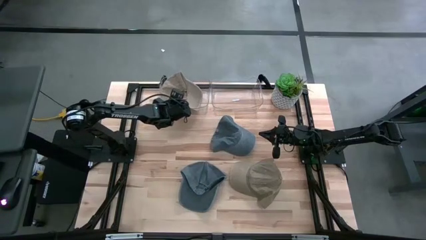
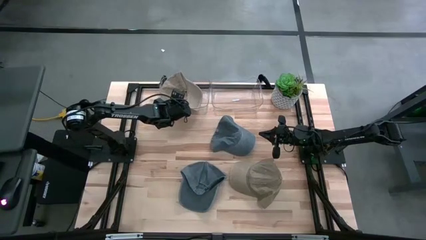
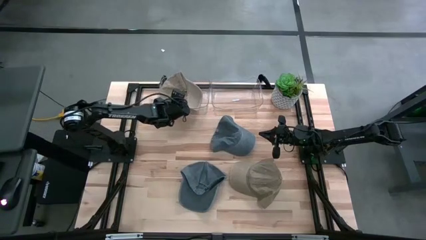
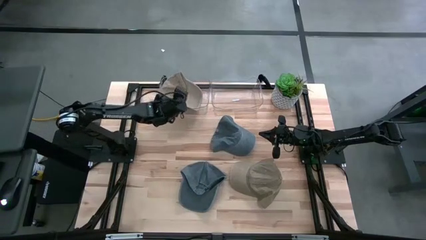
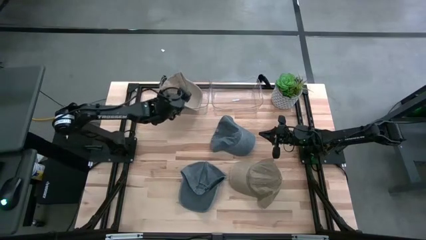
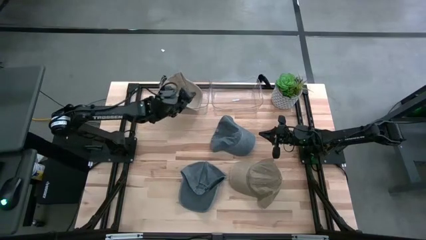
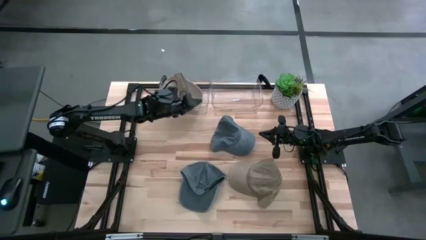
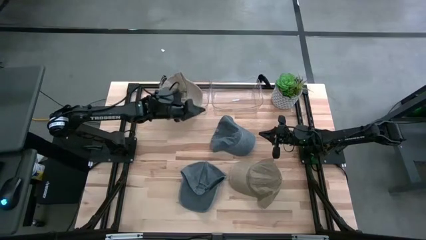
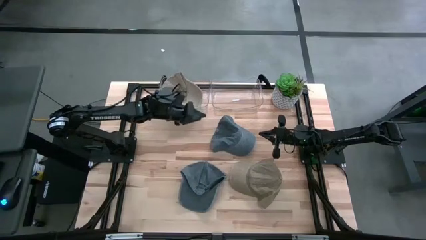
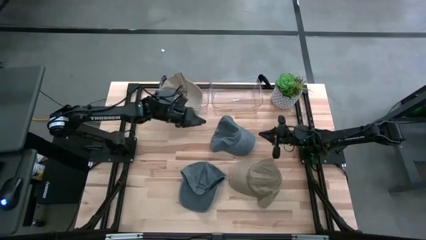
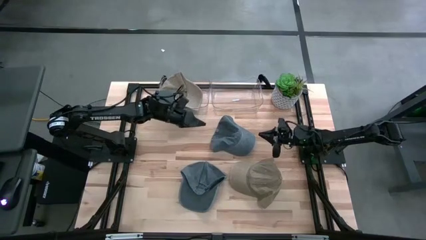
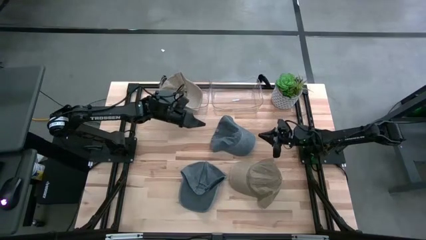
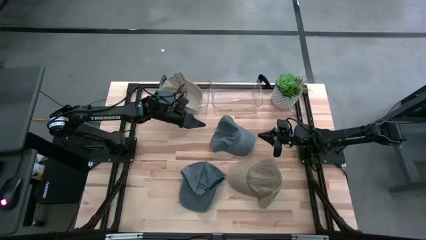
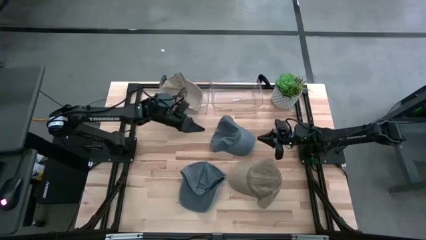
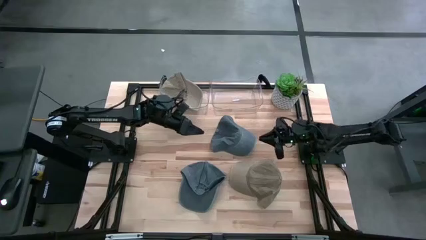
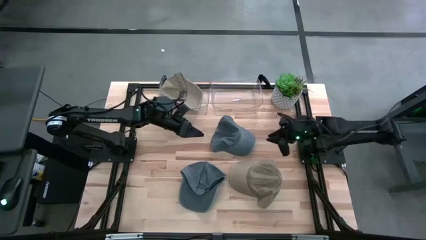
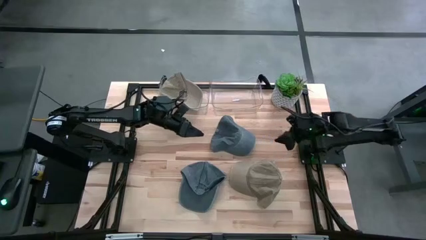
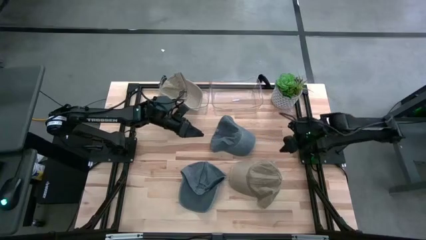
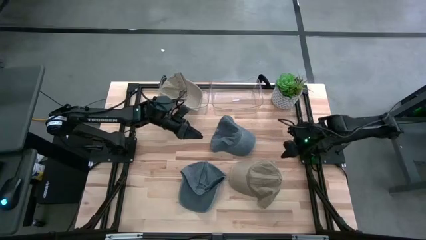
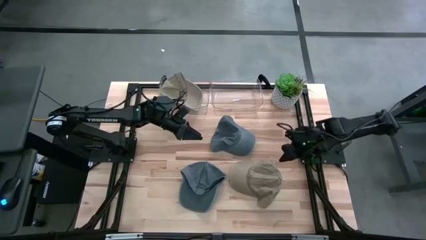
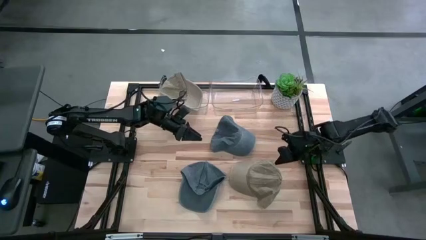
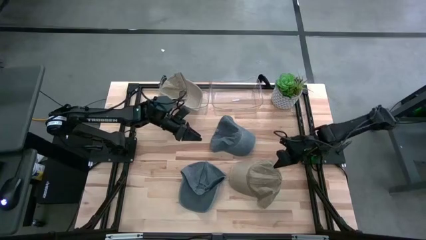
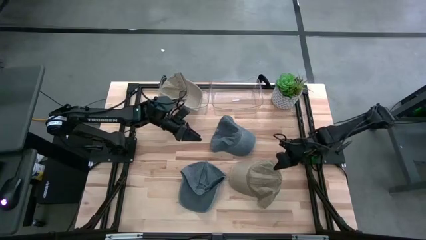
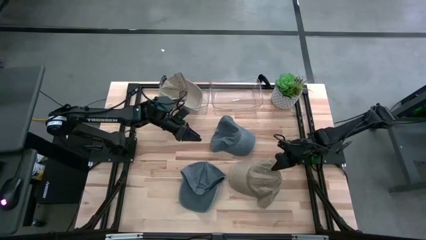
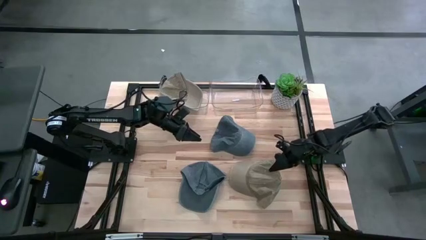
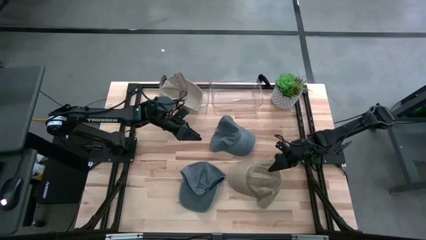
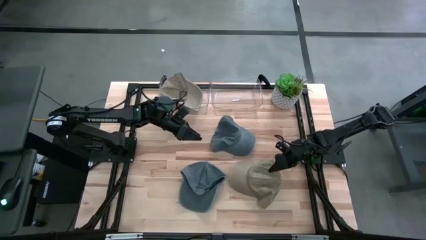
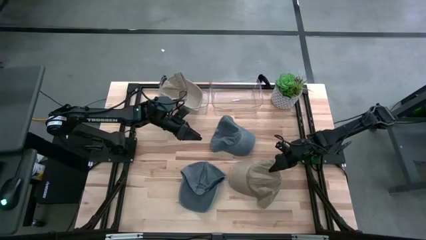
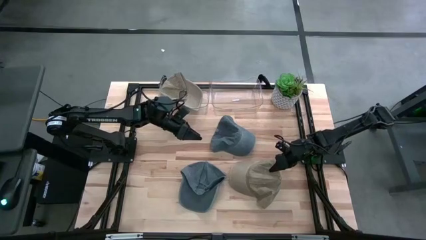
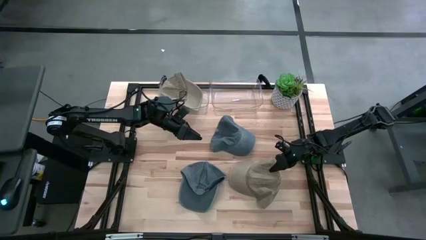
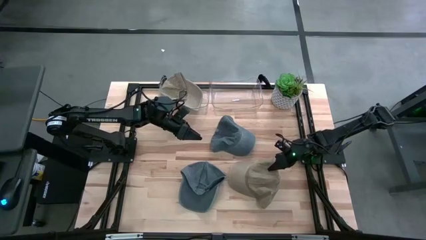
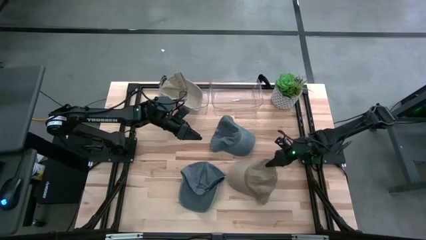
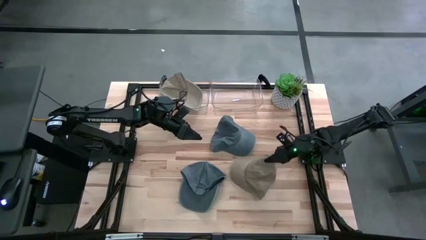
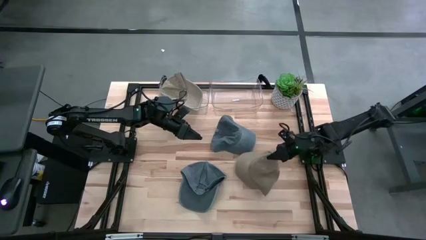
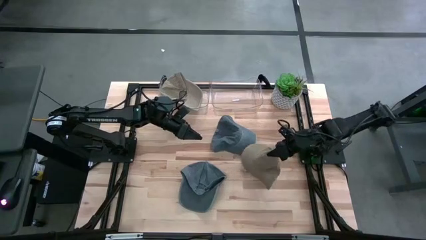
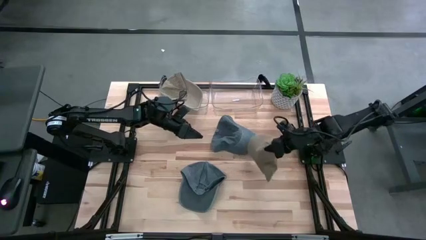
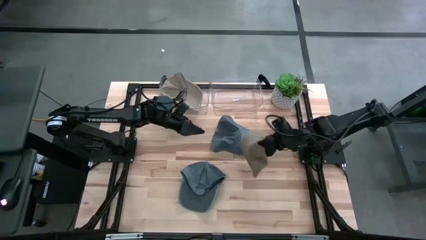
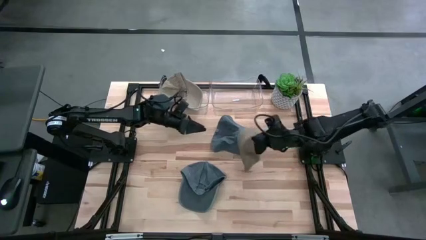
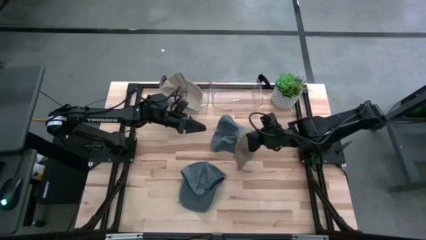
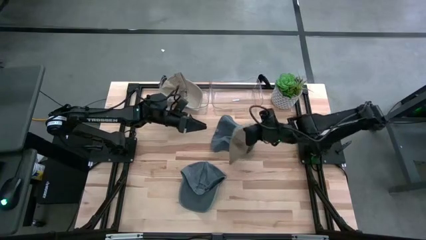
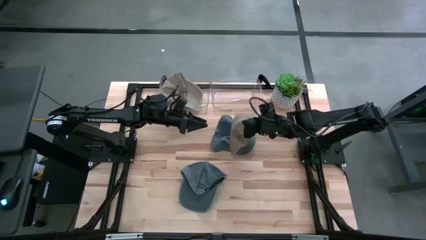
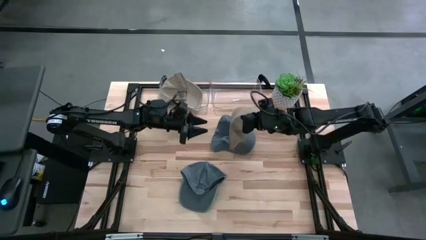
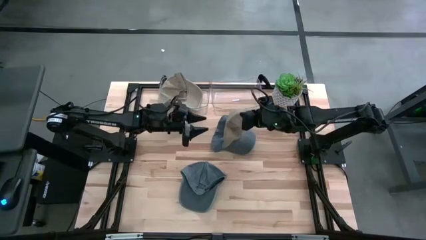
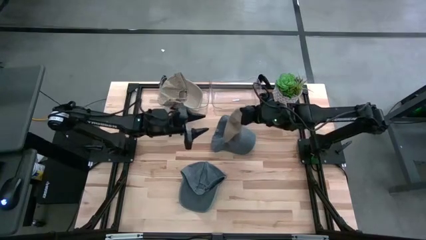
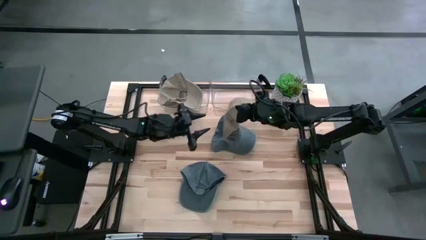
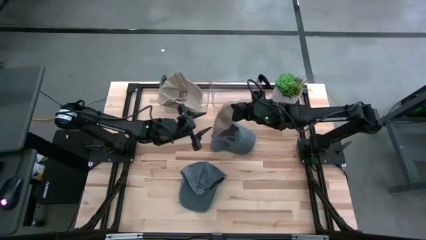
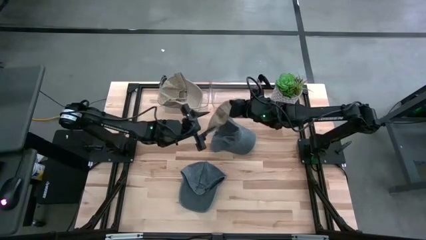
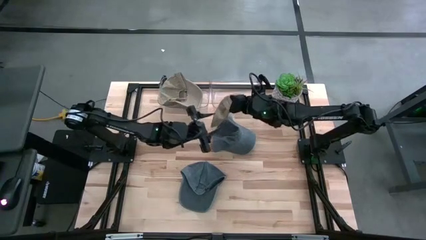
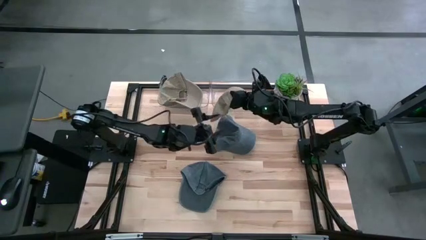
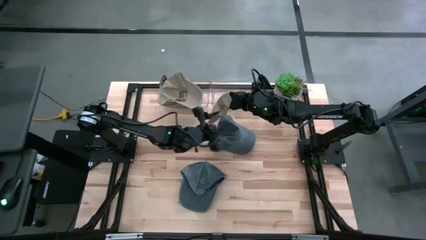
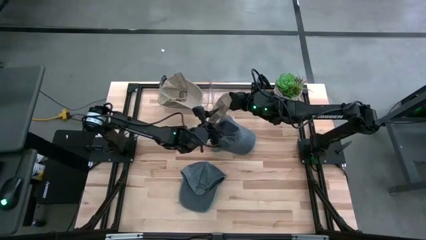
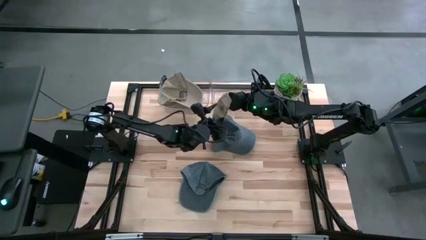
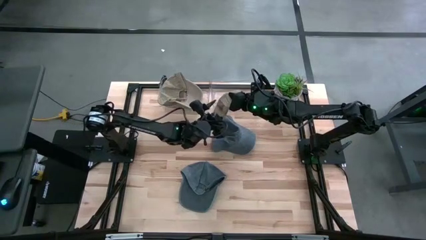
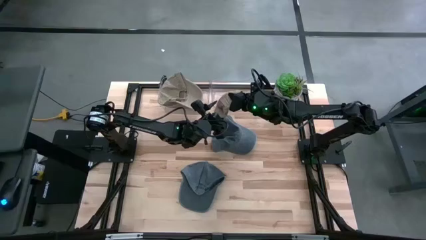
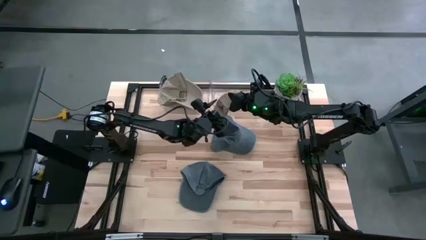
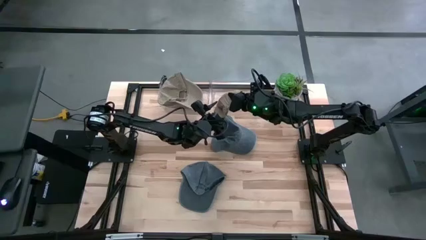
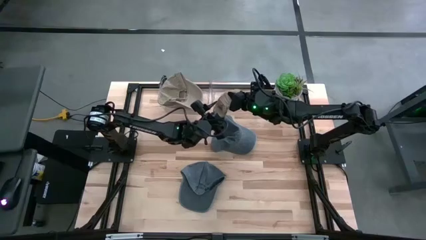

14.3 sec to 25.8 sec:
Task: Pick & Place hat
Put the brown cap into the left transparent bin

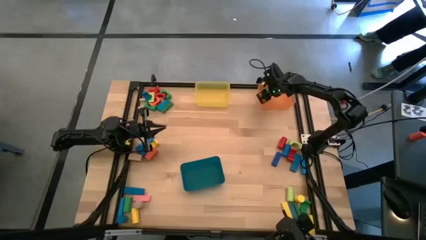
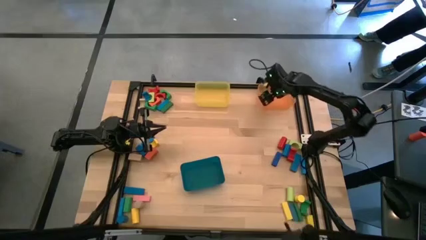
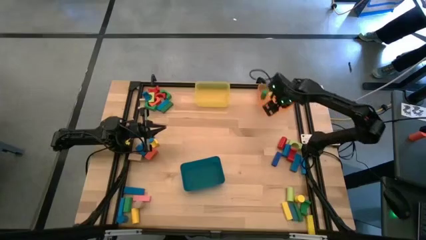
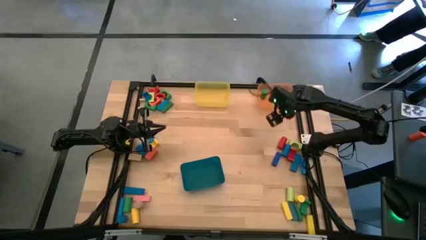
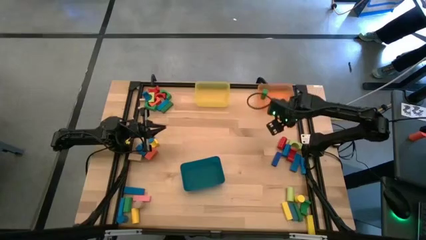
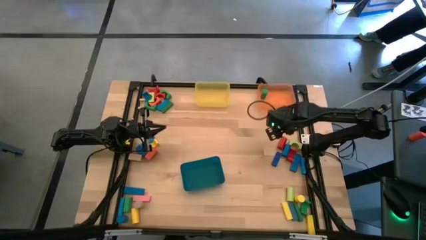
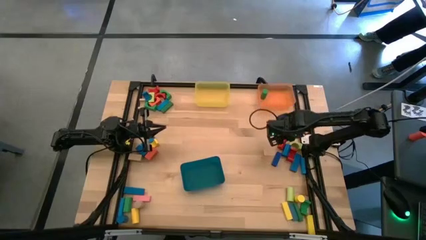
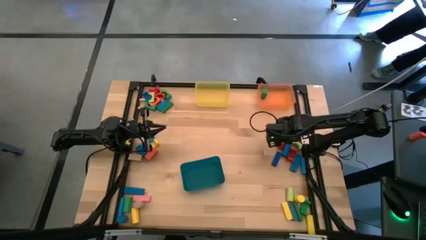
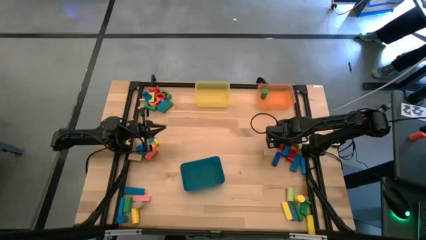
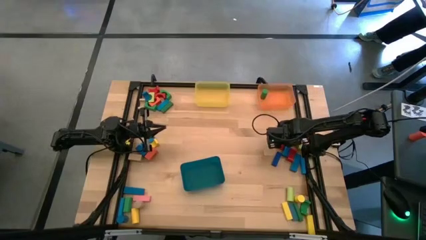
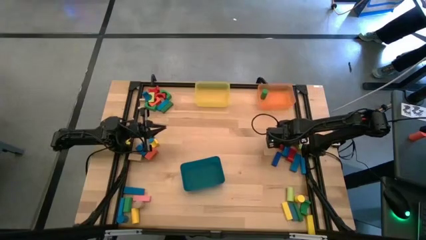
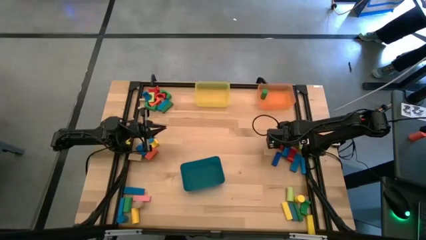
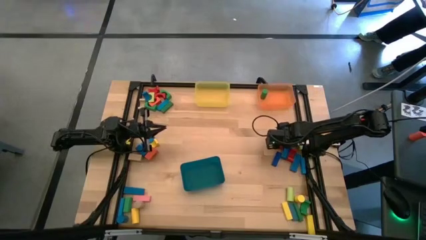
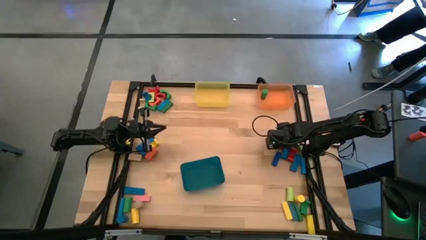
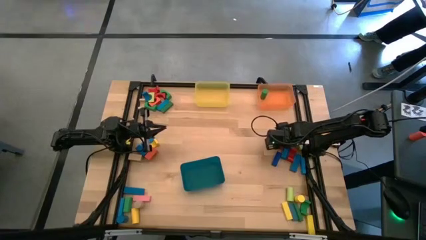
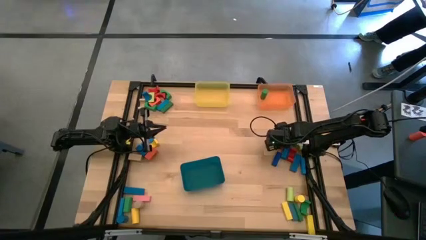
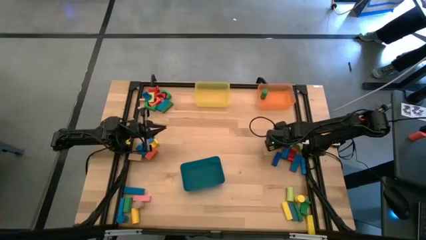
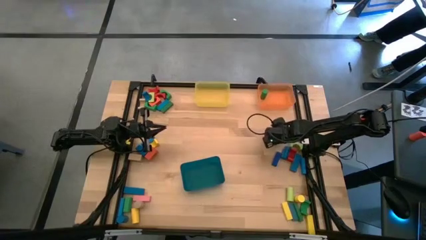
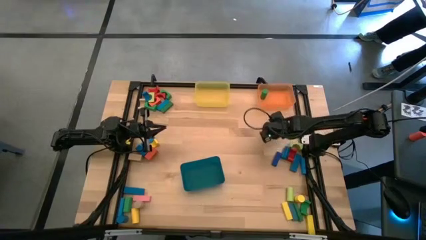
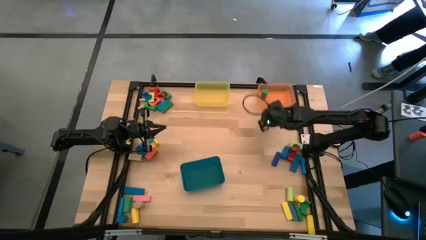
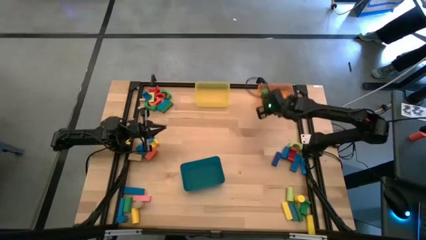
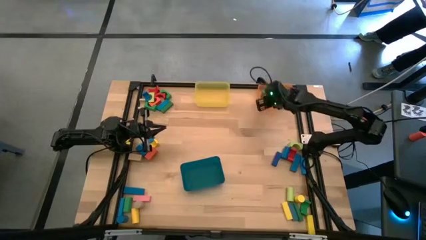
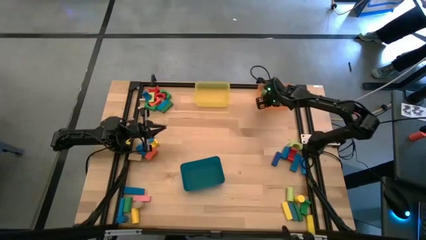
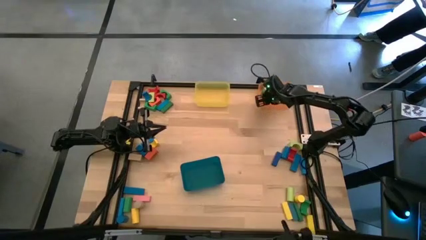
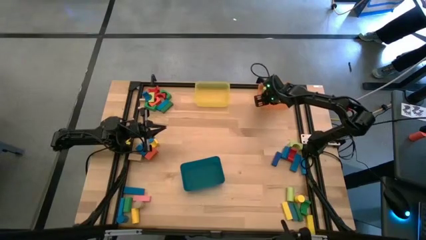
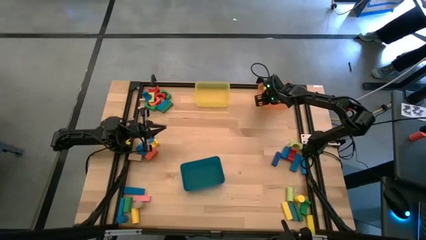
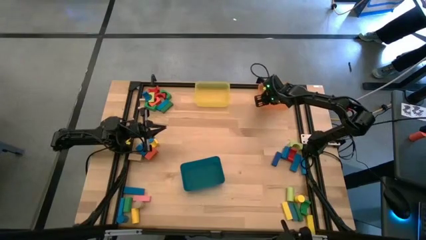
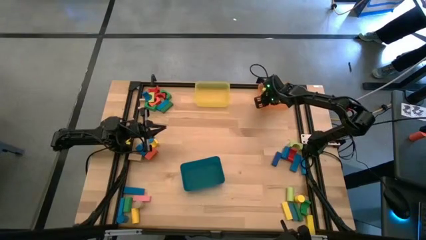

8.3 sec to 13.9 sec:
Task: Sort blocks by size
Put the red cylindrical block into the orange bin
